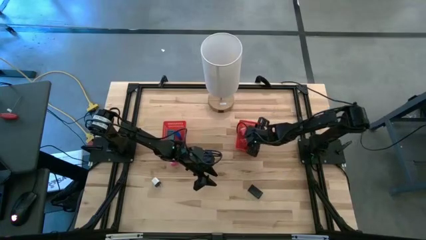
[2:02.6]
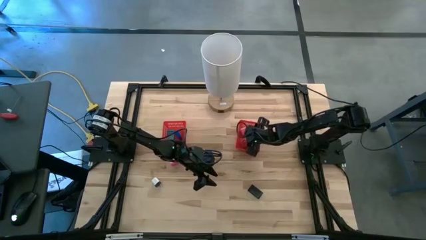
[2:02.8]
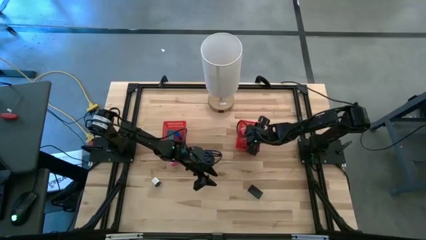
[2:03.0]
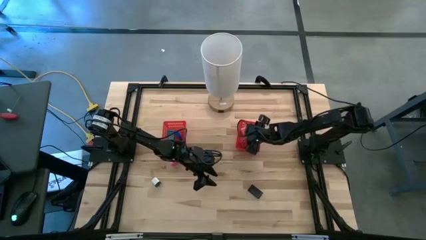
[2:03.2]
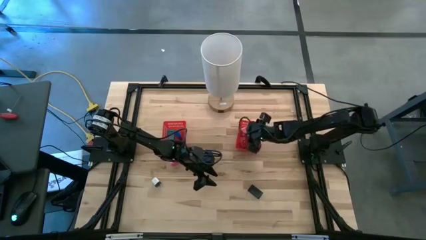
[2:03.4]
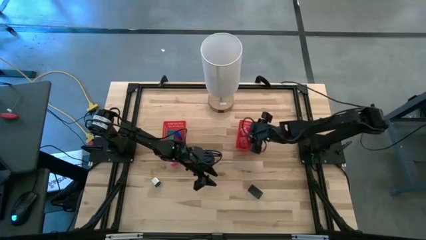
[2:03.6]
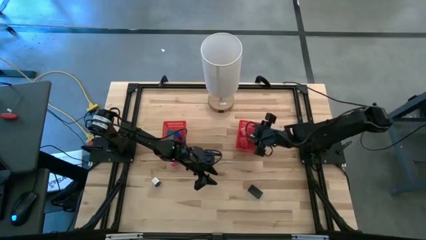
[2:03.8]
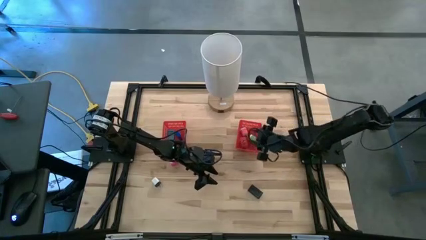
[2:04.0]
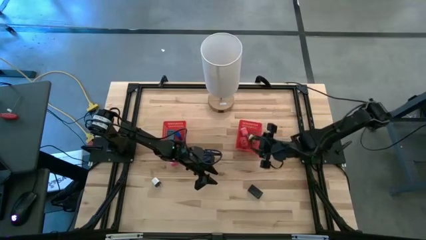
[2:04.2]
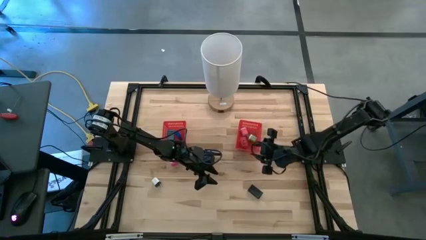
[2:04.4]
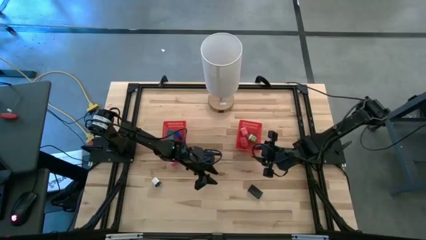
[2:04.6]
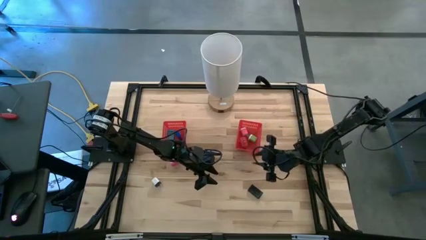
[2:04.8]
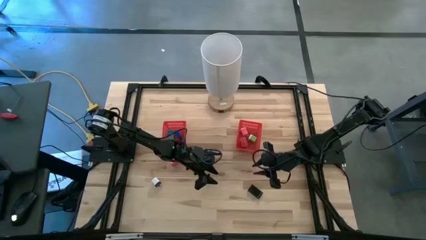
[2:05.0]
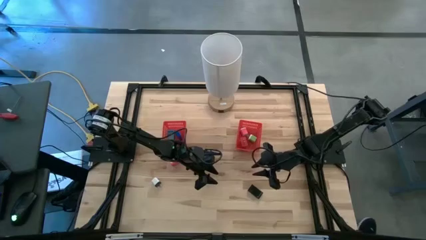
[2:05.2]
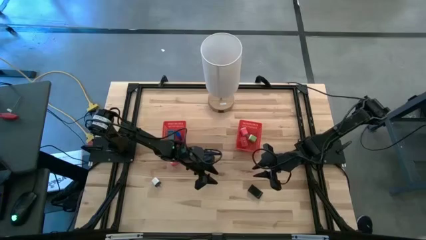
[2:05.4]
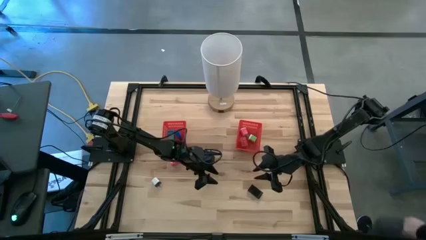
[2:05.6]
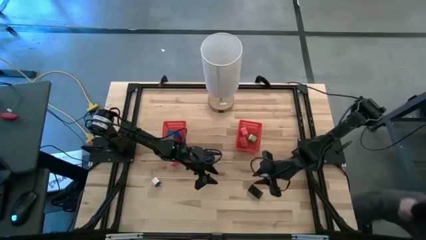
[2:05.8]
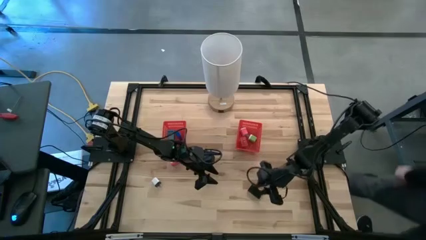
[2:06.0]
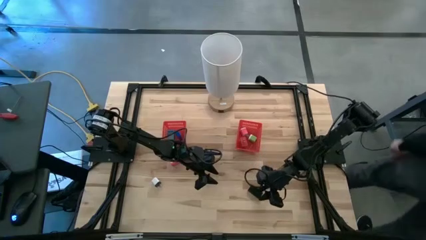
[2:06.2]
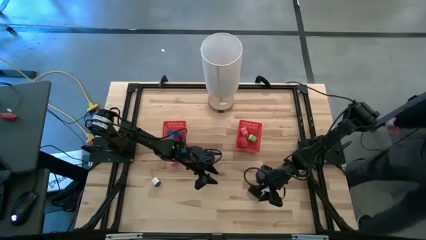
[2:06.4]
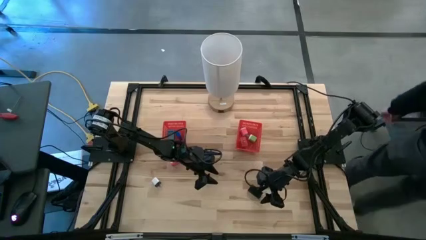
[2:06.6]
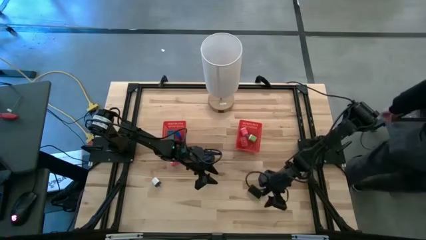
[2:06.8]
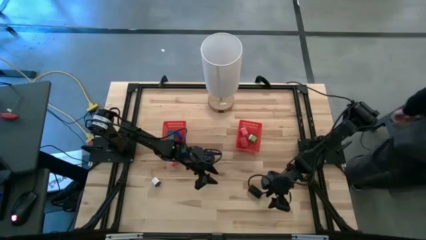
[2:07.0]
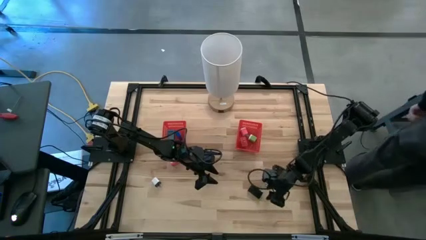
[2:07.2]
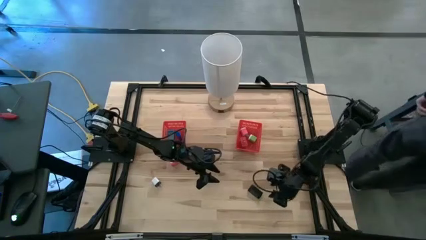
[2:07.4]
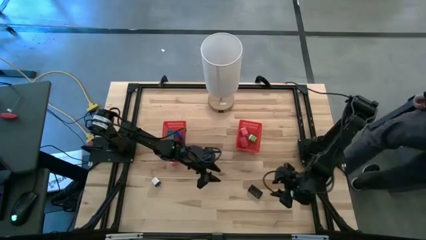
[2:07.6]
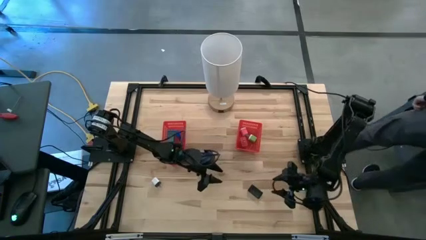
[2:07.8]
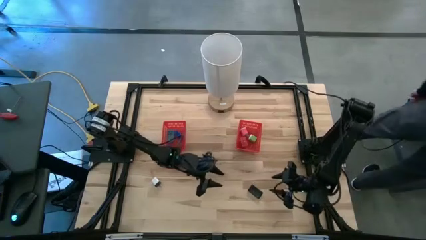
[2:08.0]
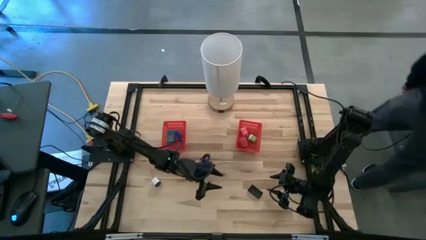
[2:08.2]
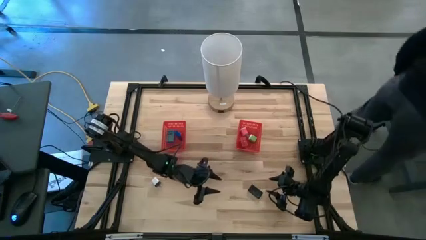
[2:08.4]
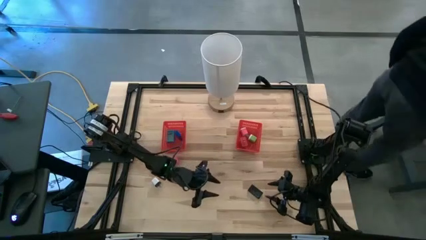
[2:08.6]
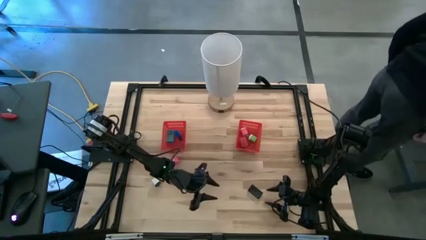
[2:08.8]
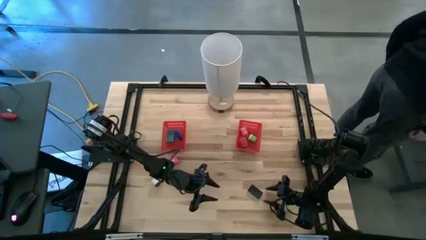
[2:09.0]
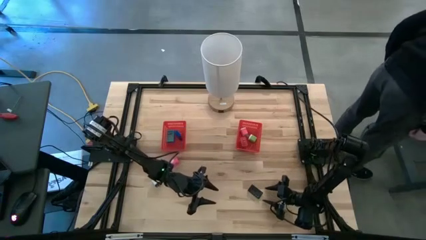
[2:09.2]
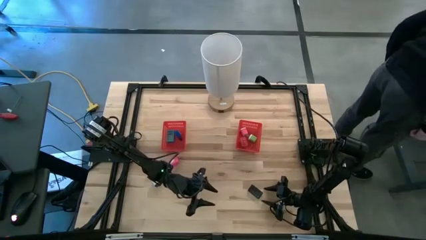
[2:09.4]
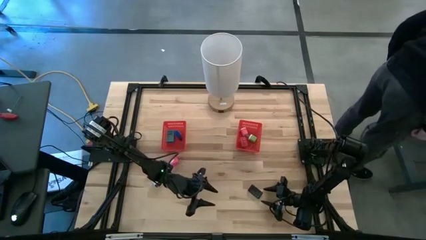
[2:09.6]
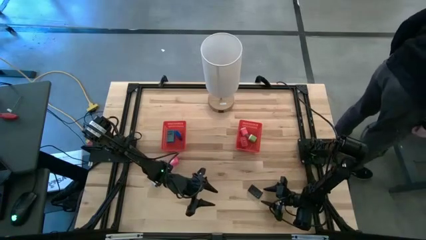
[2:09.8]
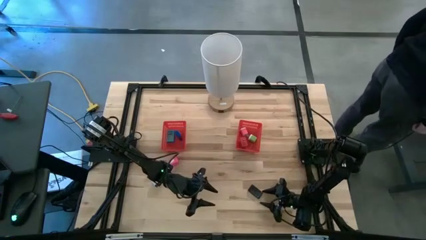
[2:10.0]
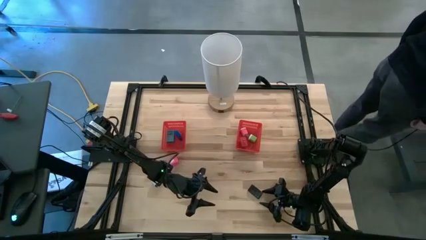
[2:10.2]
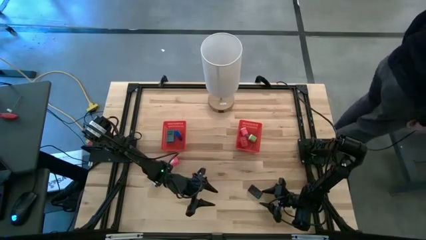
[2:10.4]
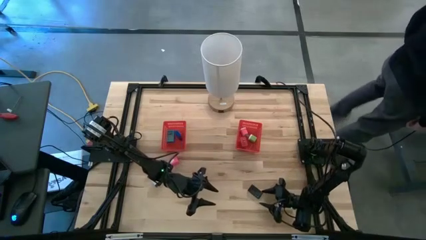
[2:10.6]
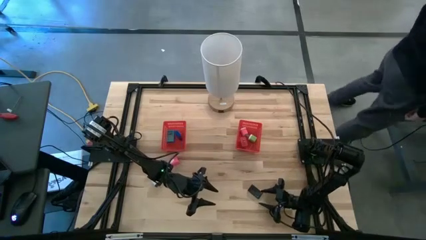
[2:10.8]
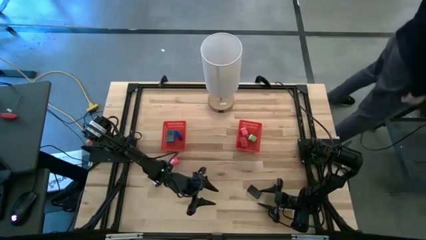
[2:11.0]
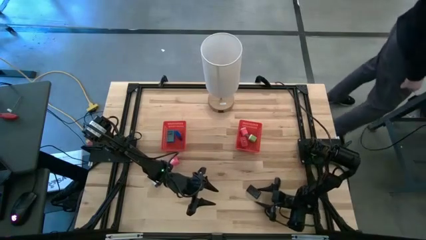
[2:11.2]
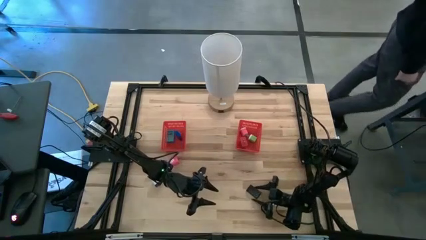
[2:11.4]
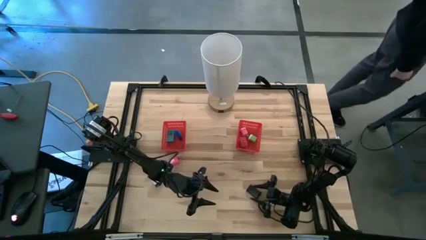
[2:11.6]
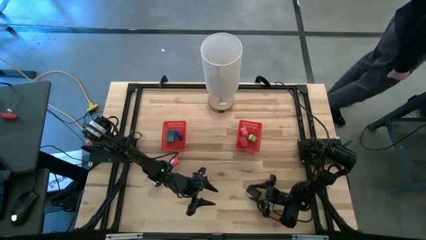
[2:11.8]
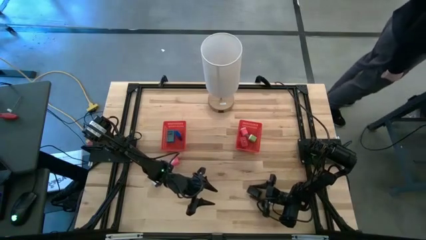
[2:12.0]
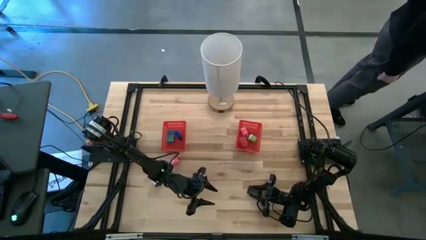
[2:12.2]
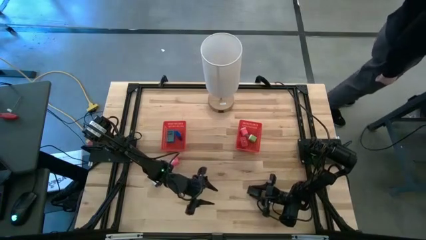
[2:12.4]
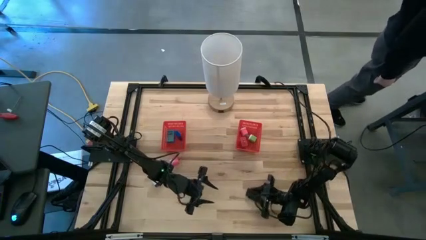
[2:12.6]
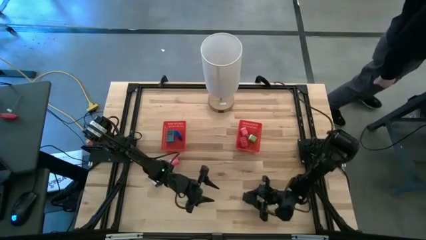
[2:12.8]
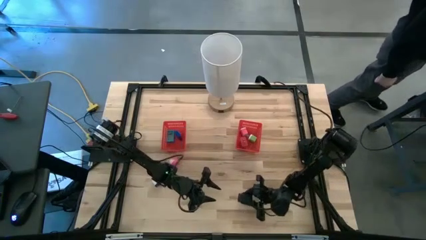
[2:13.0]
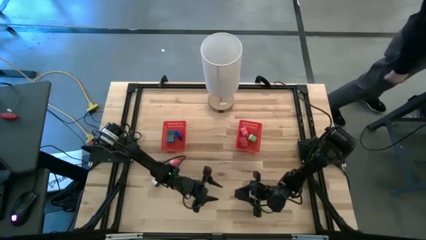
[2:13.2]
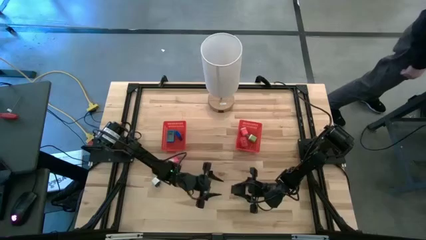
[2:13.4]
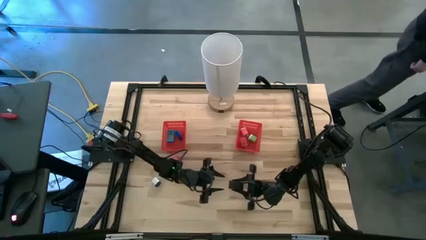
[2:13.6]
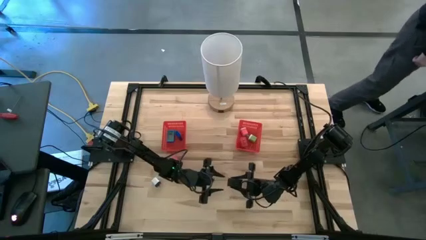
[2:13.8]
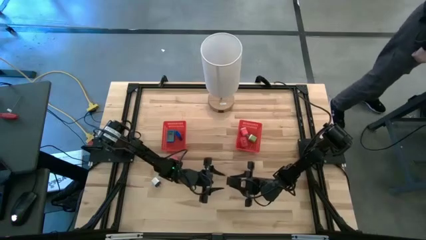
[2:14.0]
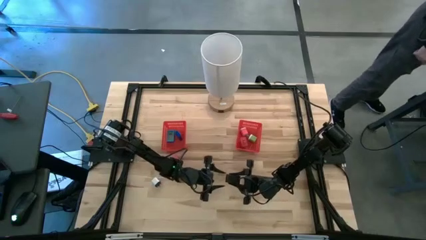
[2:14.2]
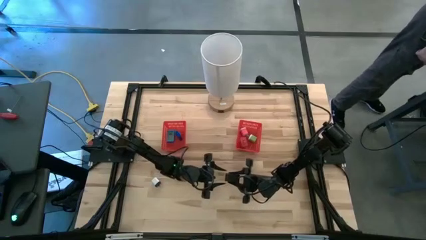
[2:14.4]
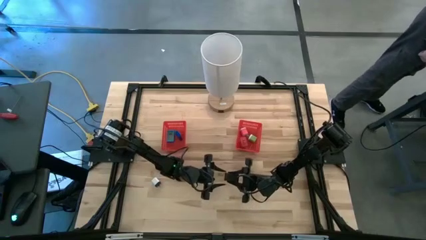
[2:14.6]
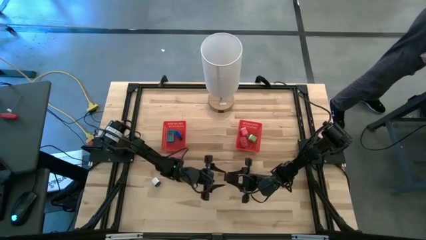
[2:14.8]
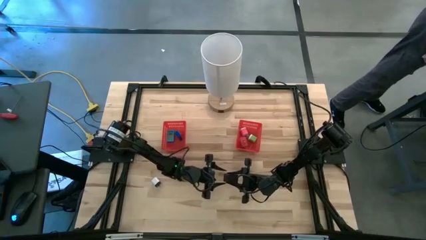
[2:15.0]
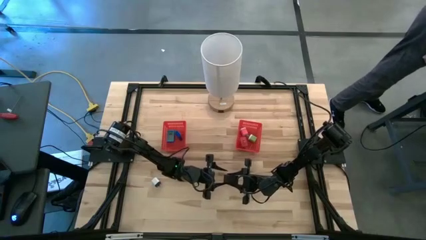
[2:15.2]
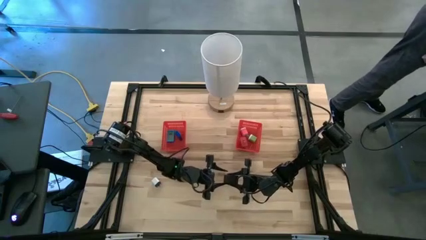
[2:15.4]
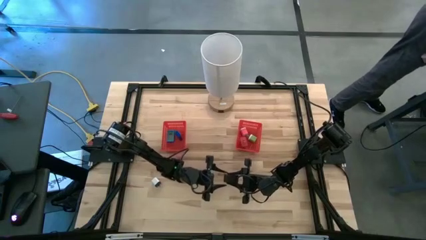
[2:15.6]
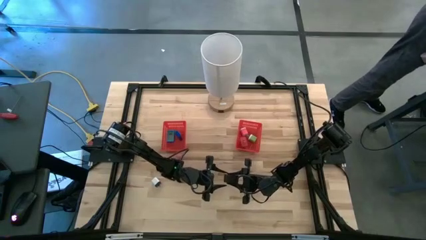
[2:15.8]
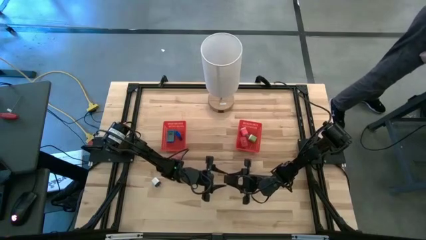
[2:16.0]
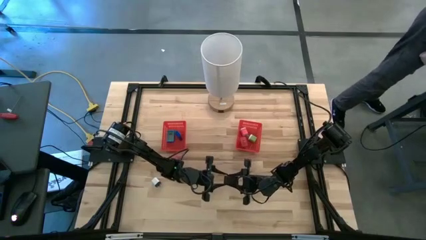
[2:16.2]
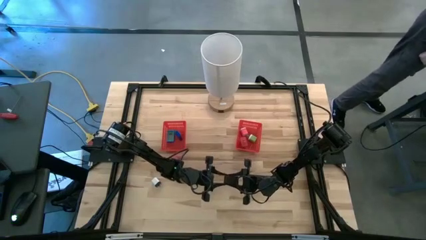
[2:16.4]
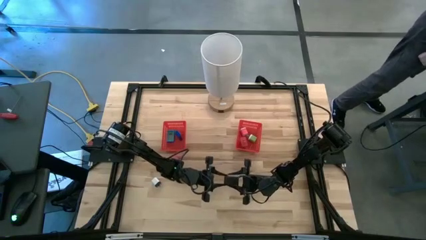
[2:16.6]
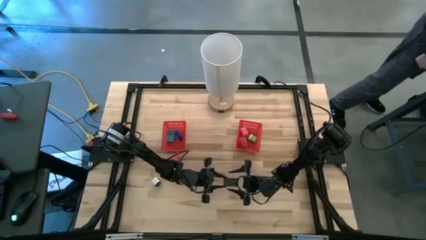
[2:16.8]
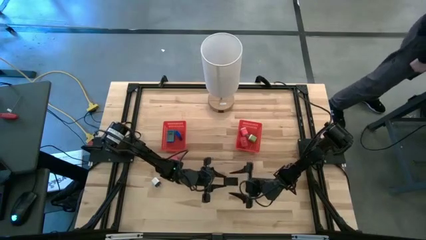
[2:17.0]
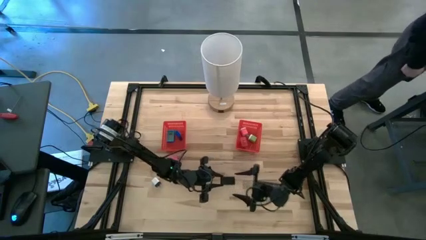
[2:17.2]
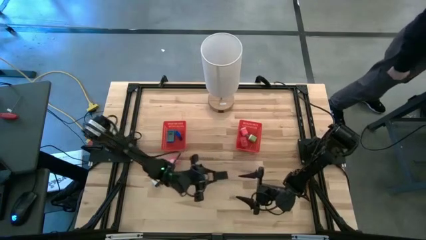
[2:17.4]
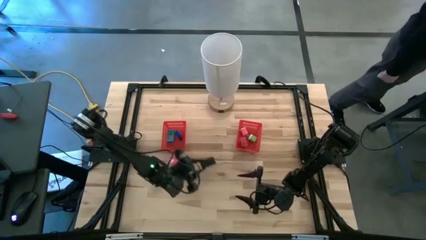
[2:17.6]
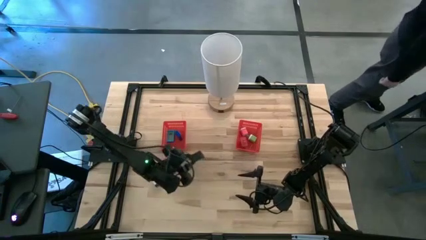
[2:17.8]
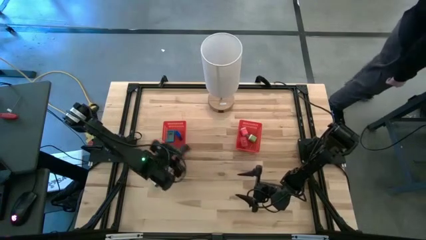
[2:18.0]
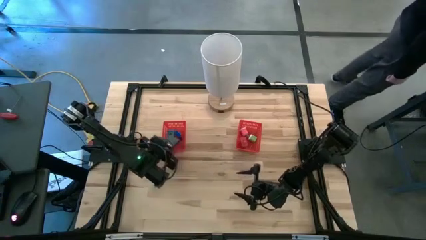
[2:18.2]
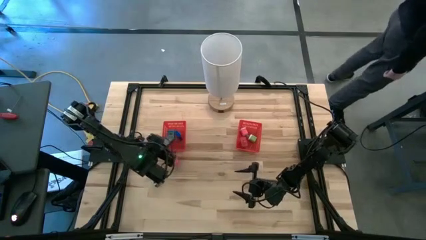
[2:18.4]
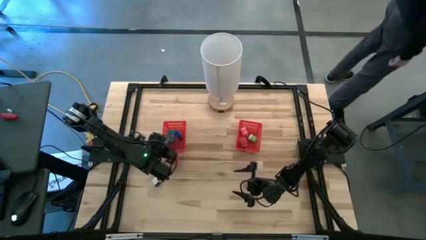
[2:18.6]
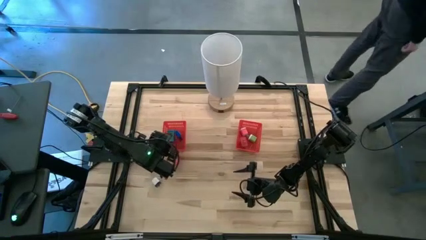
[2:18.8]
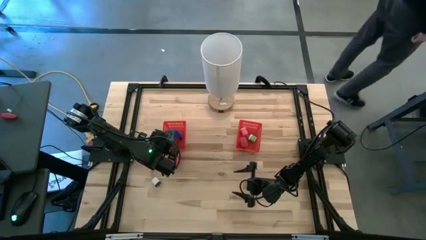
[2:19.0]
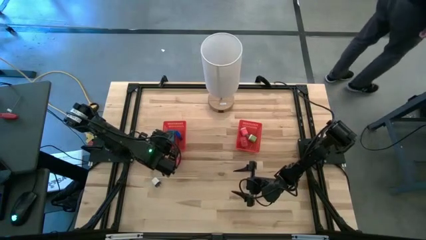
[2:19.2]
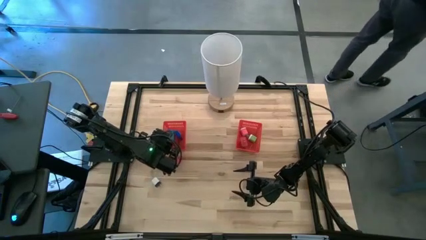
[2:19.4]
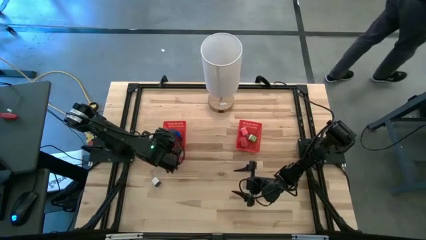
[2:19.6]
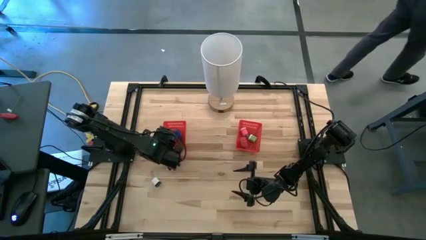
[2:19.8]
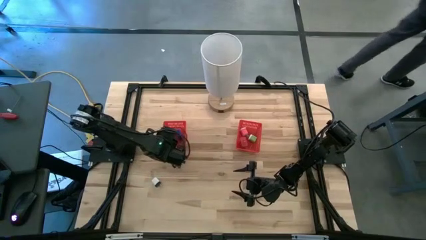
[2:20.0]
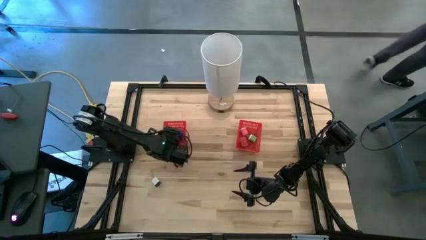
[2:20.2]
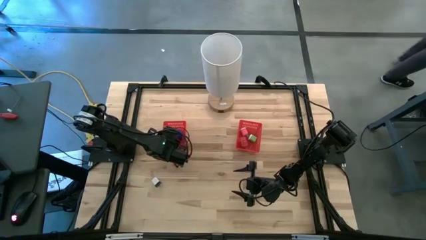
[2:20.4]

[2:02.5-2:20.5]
Task: Pick & Place Office items
Put the black digital timer into the left red bin
